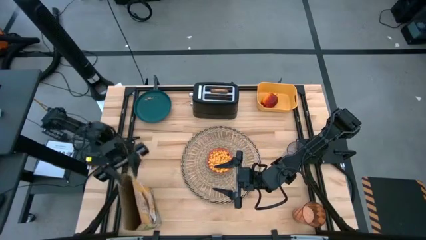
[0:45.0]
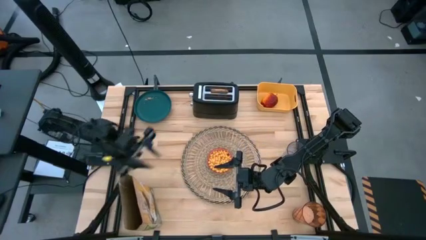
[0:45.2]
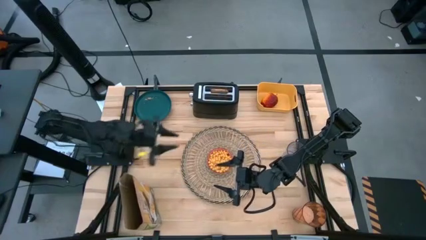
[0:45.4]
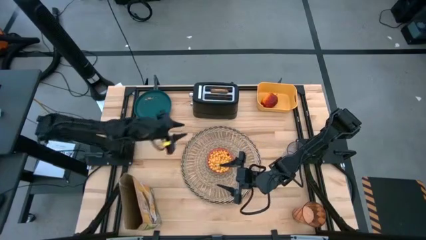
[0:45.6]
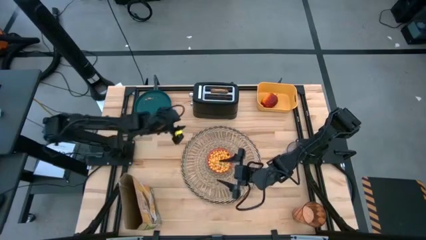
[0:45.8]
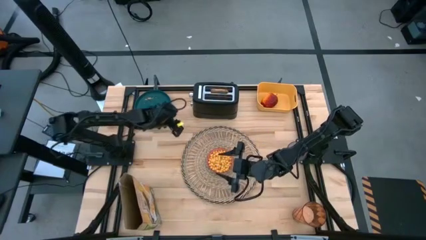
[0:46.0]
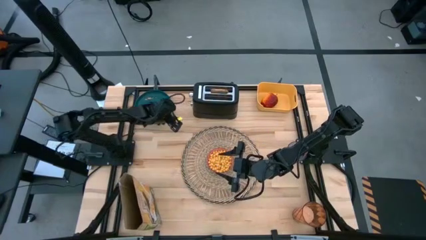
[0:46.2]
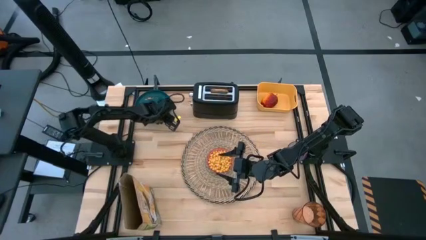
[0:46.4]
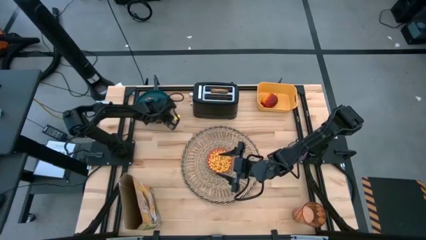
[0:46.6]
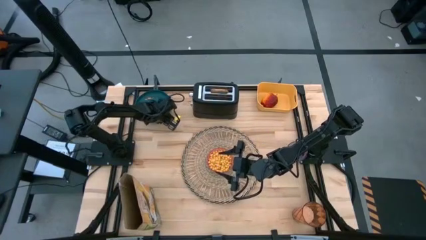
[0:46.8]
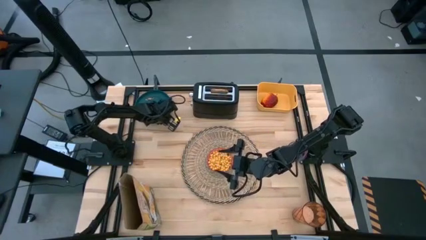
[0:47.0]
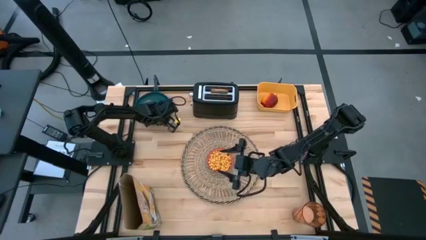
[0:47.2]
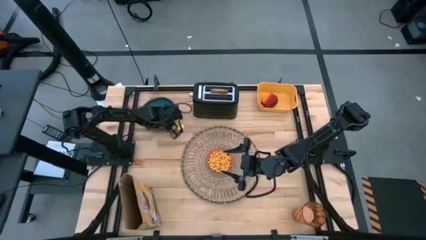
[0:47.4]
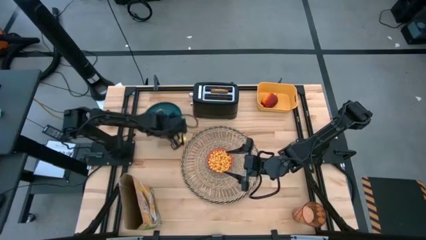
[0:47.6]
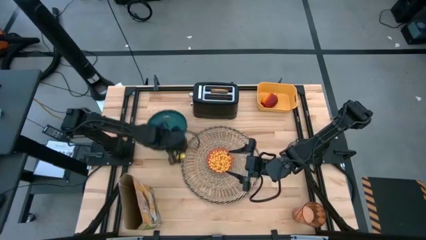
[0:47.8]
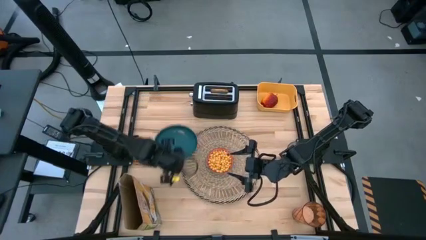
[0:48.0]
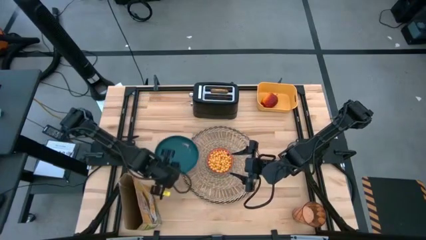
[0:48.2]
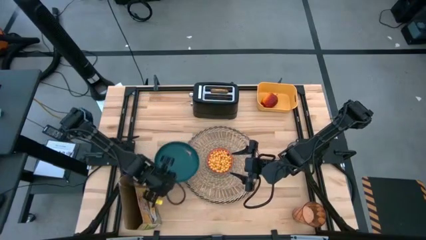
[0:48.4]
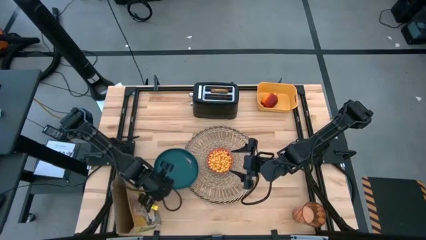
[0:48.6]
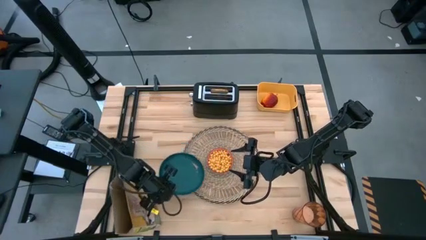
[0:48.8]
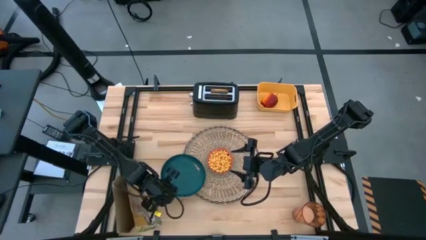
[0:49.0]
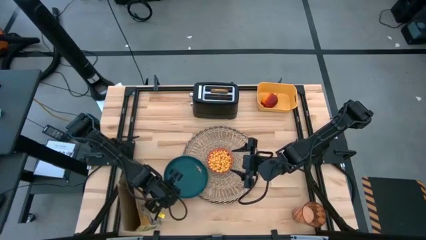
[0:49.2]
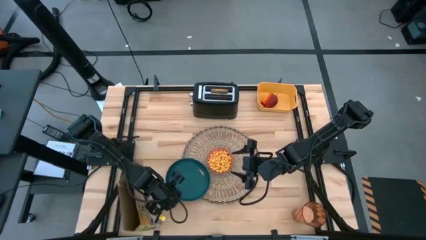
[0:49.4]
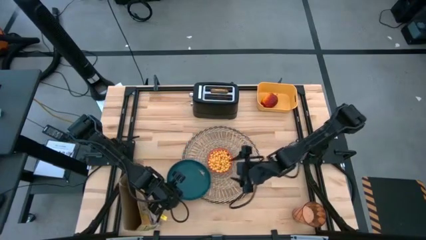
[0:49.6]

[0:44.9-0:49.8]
Task: Arrange a breakfast setting
Put the dark green plate on the brown table mat

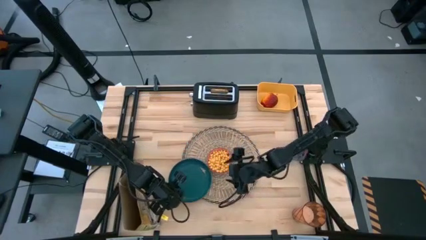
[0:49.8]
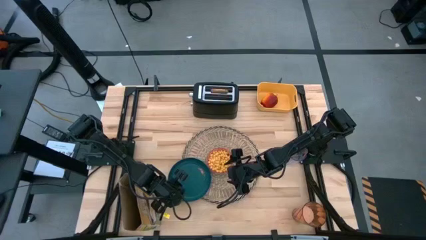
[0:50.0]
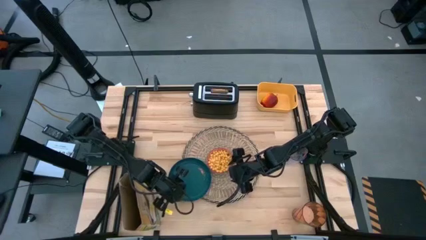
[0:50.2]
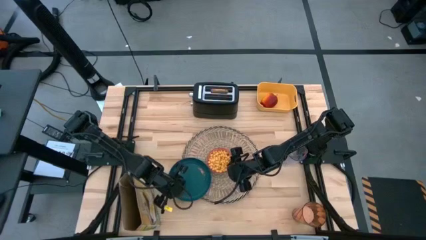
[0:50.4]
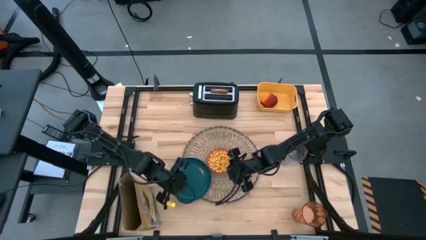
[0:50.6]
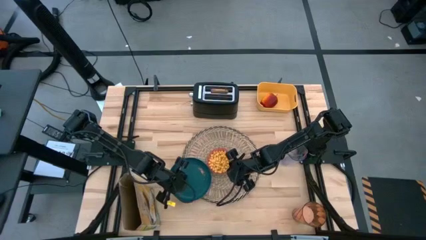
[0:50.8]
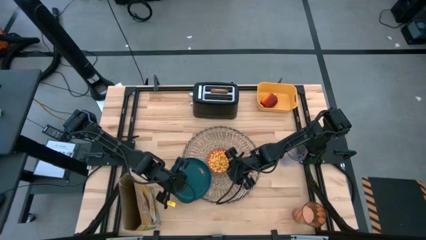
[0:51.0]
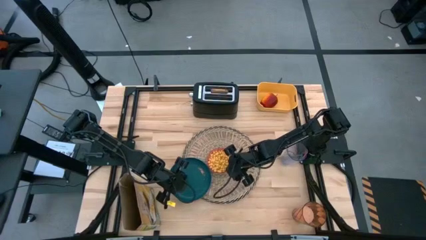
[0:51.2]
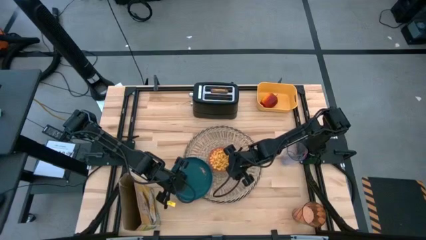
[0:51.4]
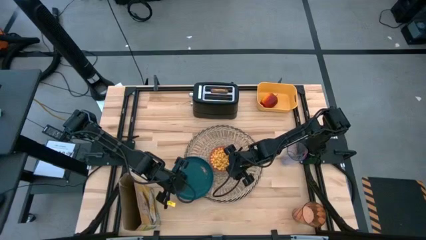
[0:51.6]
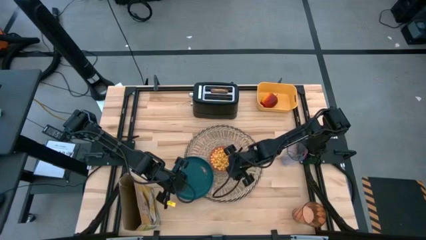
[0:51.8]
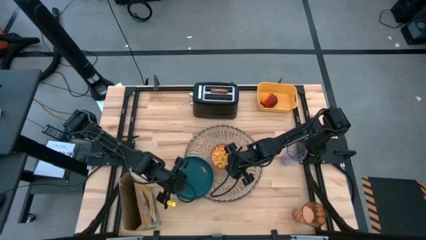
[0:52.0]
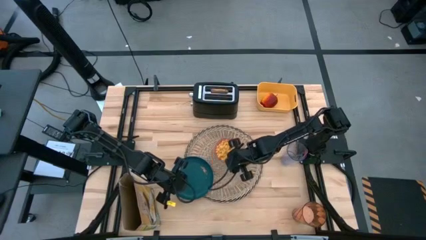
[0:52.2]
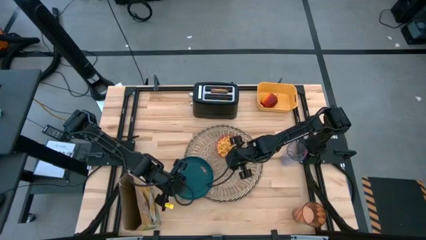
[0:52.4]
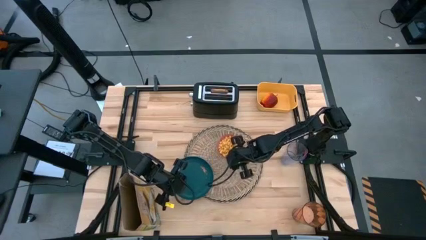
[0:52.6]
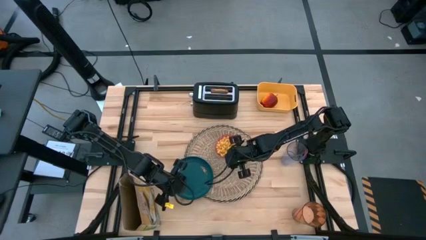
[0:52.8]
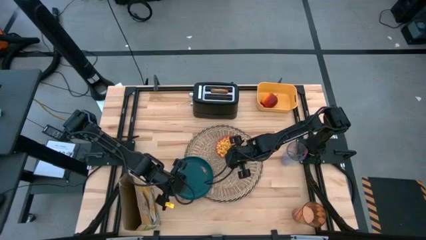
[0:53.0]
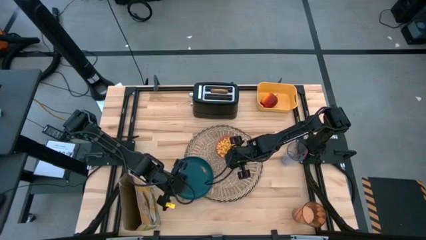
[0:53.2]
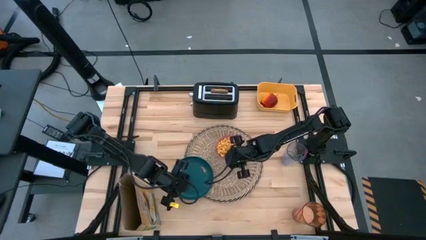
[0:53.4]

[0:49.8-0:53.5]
Adjust the red bowl on the brown table mat

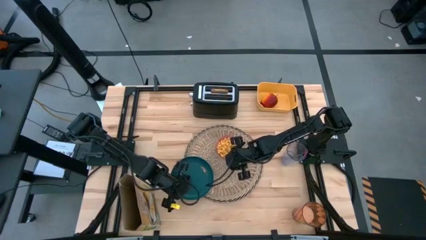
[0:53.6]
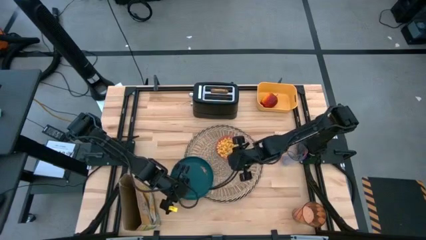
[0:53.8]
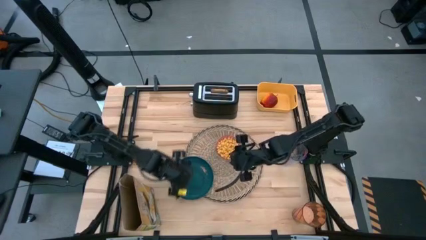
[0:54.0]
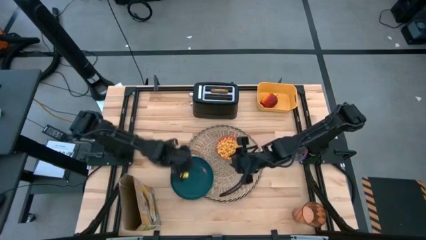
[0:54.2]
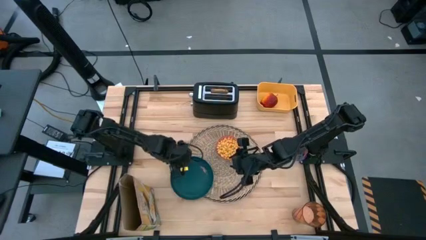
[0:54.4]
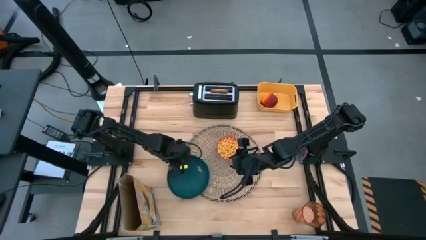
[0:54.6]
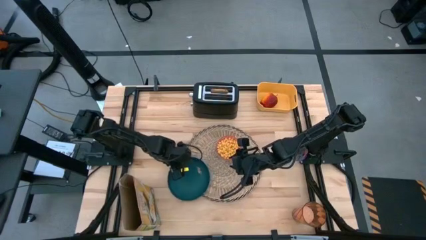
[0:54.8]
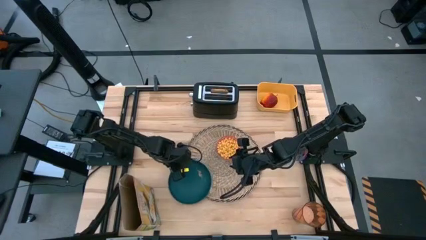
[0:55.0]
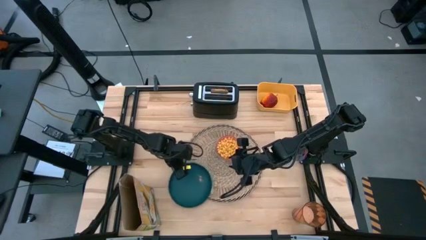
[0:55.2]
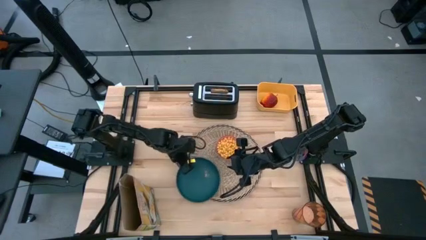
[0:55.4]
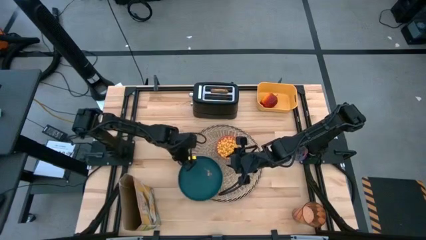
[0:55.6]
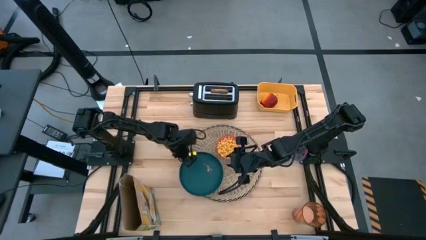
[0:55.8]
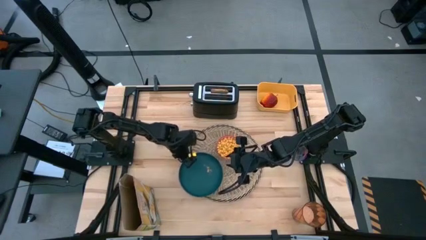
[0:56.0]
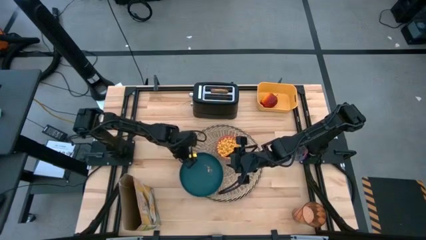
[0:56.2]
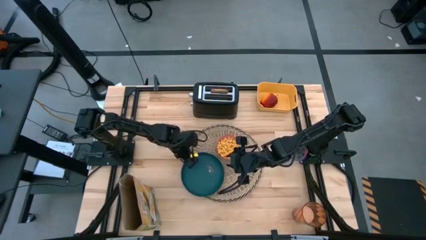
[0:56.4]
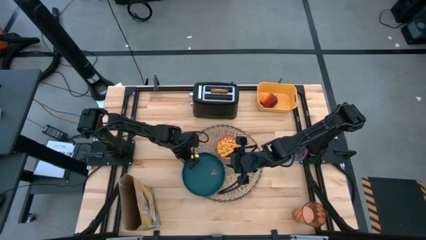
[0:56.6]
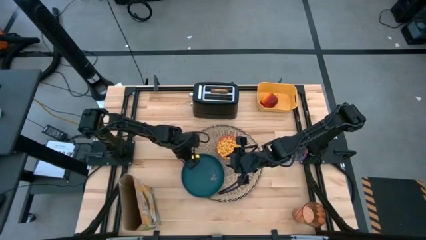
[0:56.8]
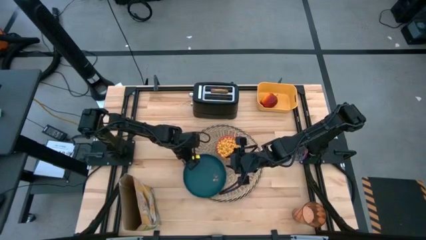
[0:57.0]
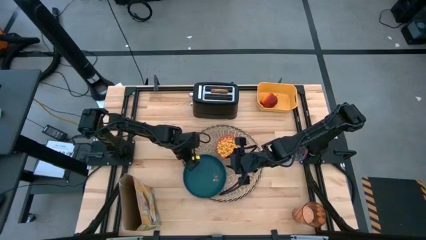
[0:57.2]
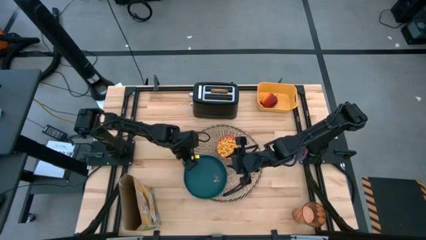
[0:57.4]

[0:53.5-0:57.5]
Adjust the blue plate on the brown table mat

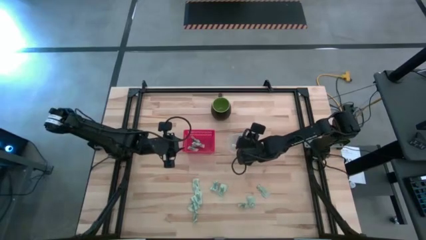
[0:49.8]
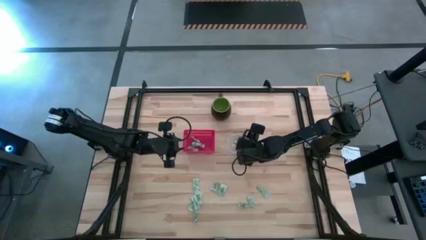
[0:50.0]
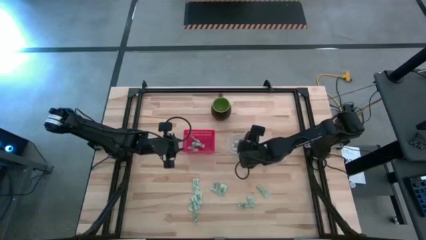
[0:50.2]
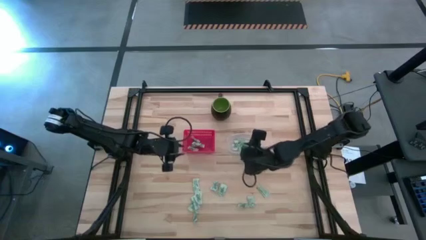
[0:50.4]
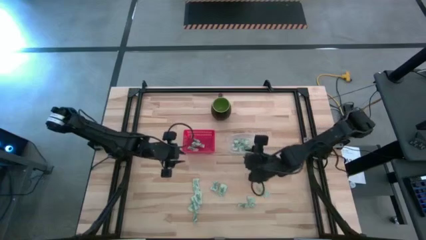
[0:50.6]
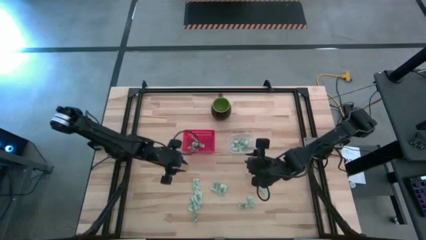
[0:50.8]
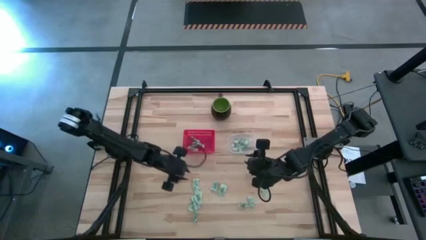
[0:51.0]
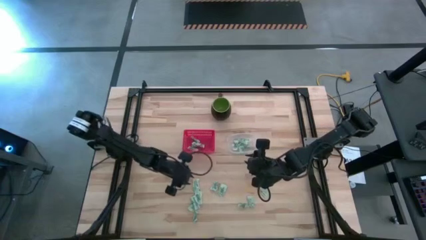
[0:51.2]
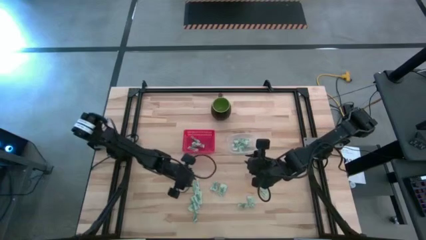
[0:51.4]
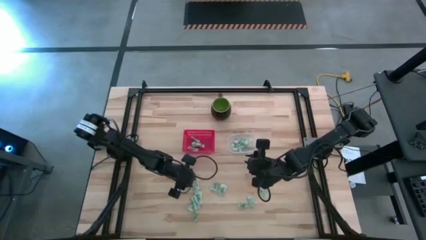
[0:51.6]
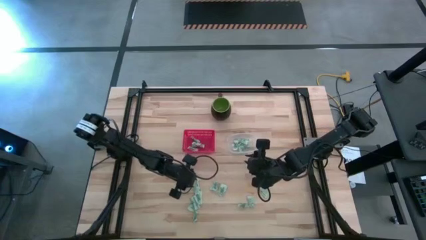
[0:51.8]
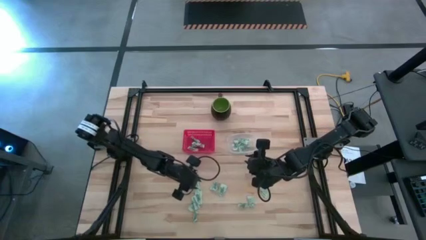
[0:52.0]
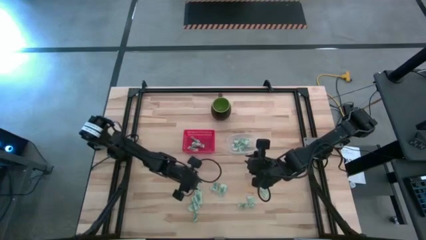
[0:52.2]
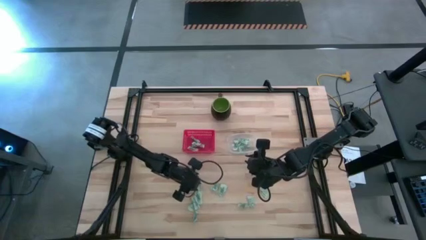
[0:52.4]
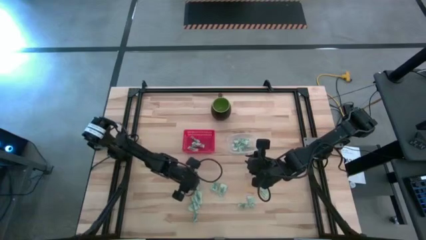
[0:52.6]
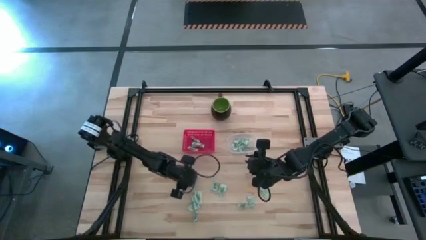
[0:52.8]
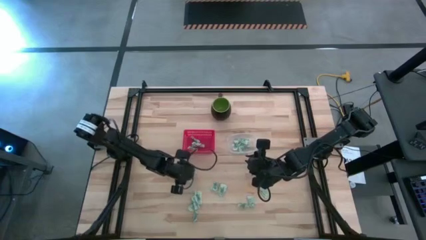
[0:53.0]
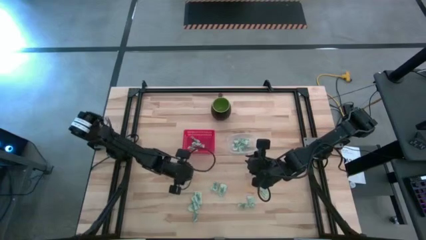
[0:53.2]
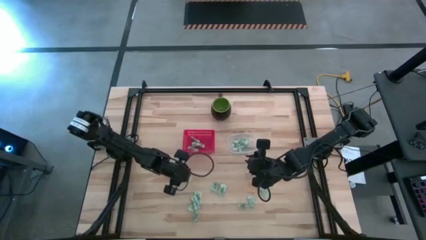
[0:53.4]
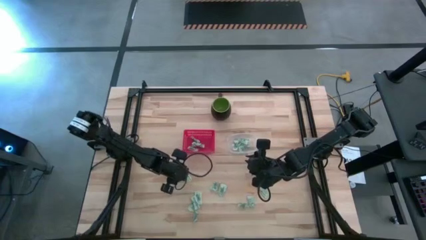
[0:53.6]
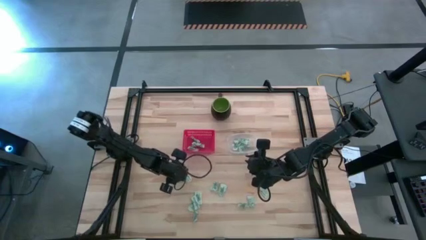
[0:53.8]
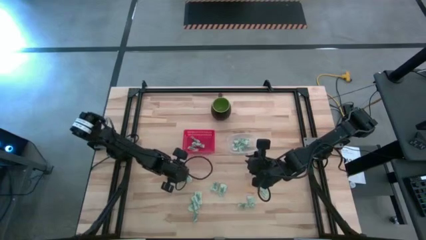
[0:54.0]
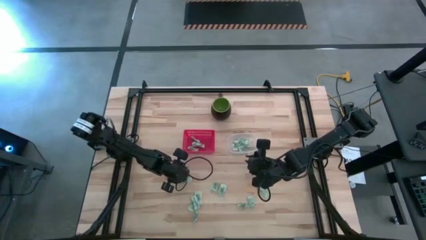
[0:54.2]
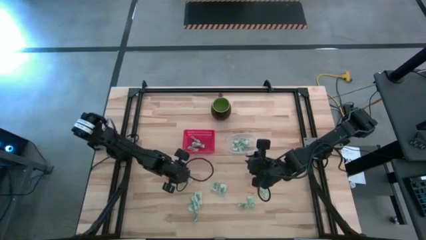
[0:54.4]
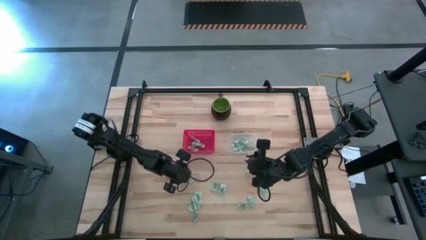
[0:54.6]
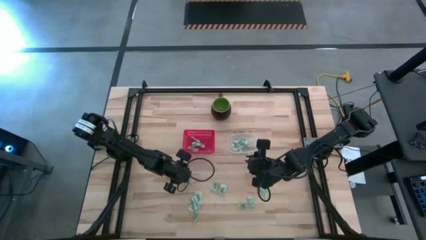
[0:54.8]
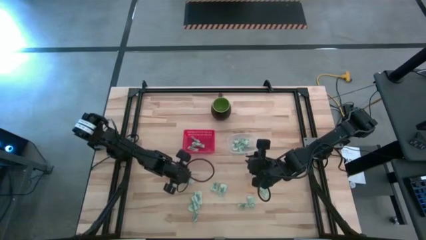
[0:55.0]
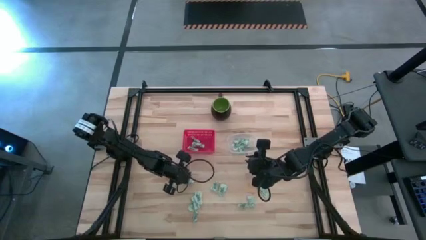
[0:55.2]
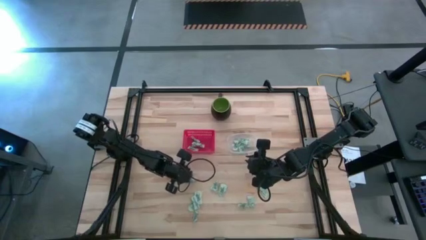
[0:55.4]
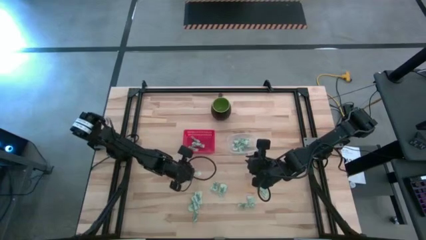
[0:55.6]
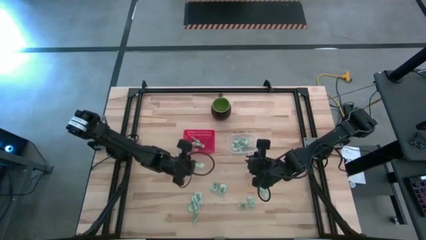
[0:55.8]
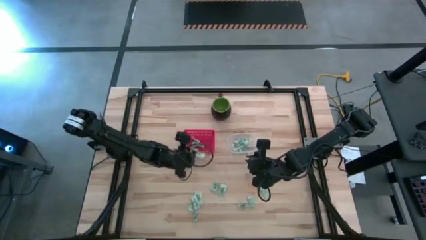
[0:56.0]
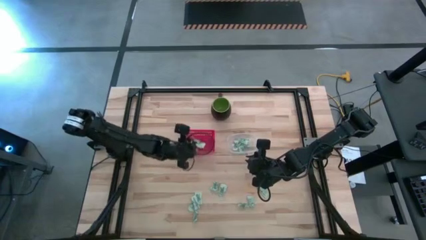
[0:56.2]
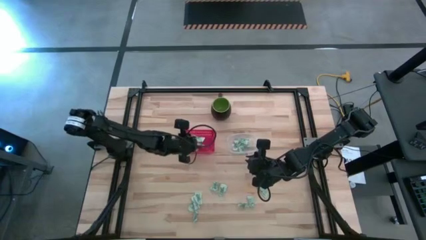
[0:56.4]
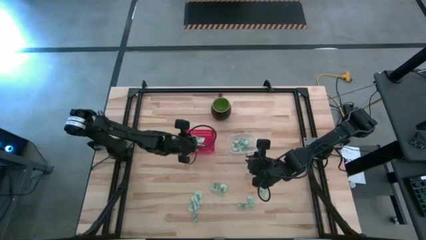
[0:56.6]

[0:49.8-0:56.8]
Task: Pick and place items into bin
Put the stevia packet into the red bin
